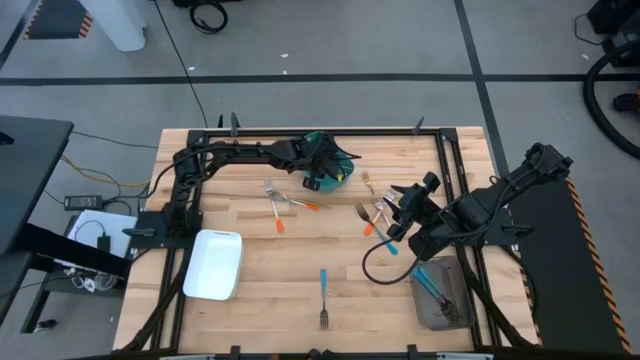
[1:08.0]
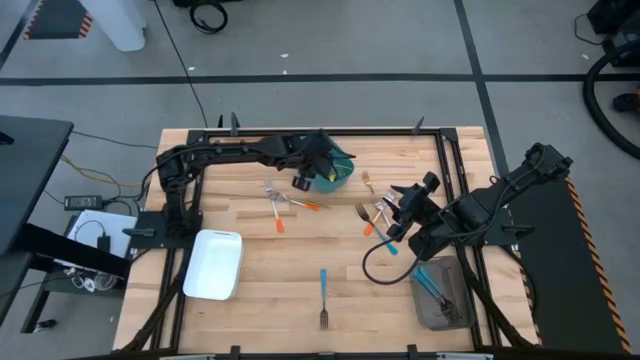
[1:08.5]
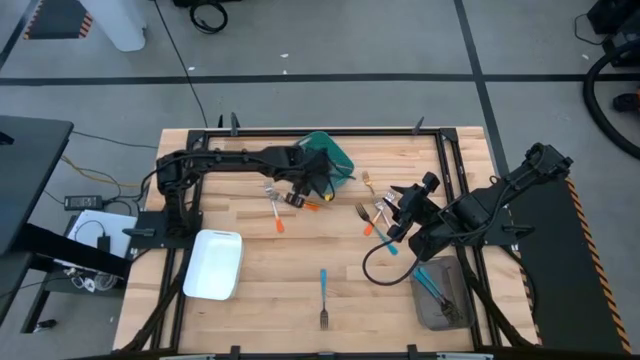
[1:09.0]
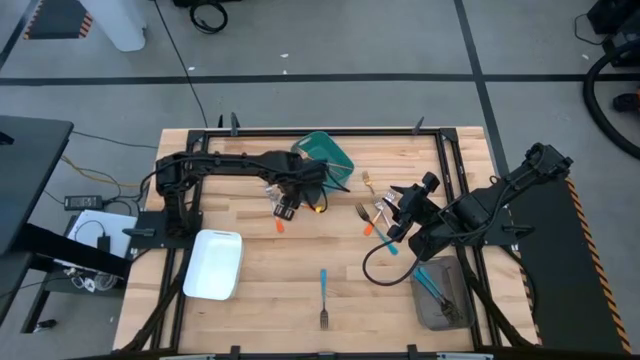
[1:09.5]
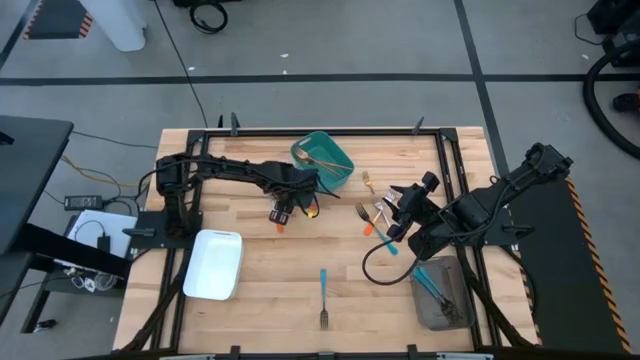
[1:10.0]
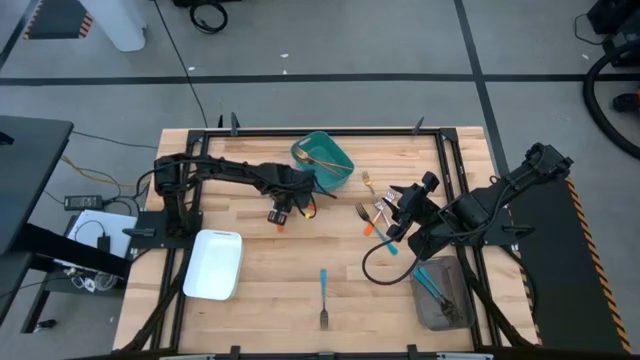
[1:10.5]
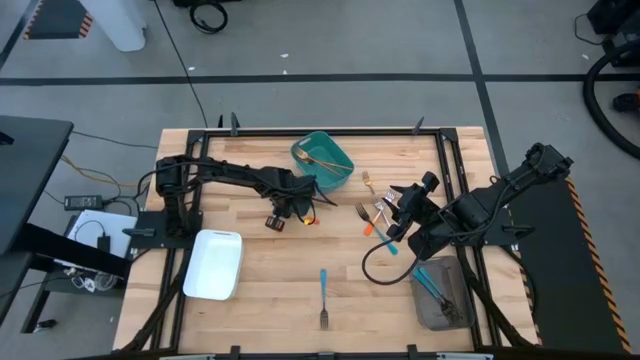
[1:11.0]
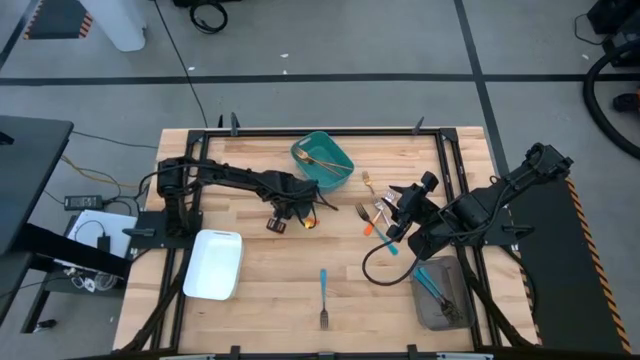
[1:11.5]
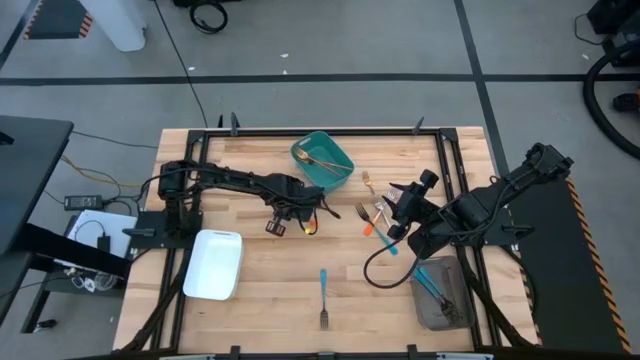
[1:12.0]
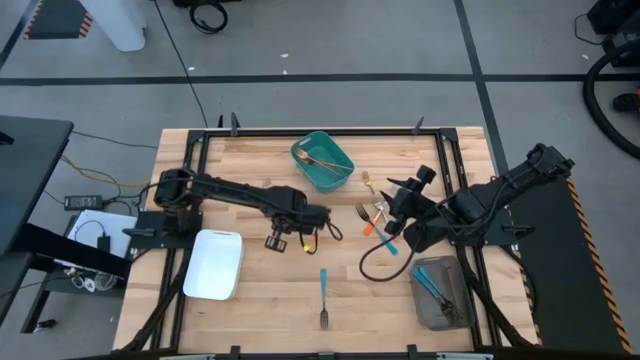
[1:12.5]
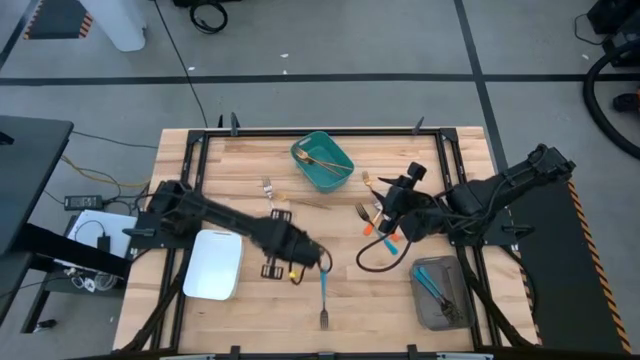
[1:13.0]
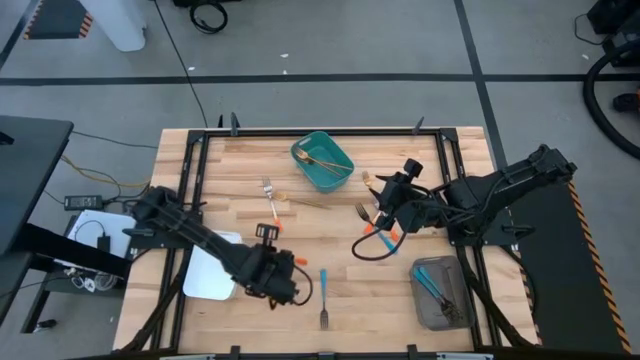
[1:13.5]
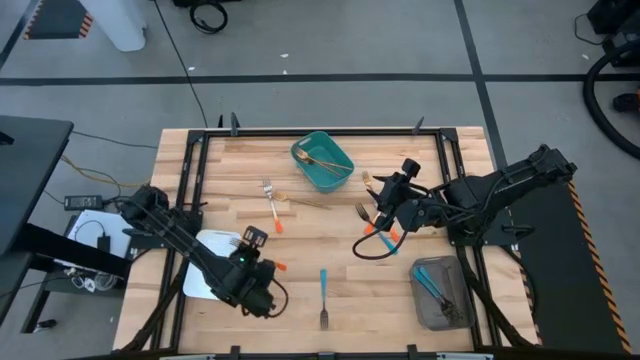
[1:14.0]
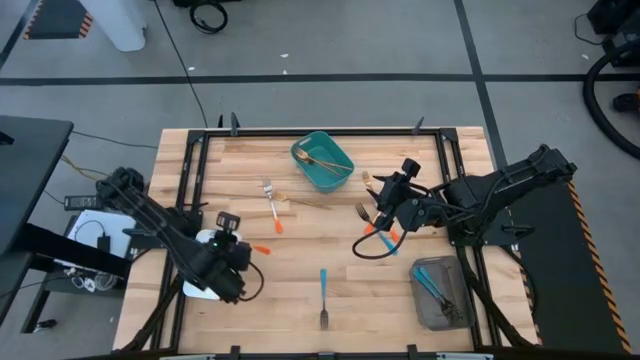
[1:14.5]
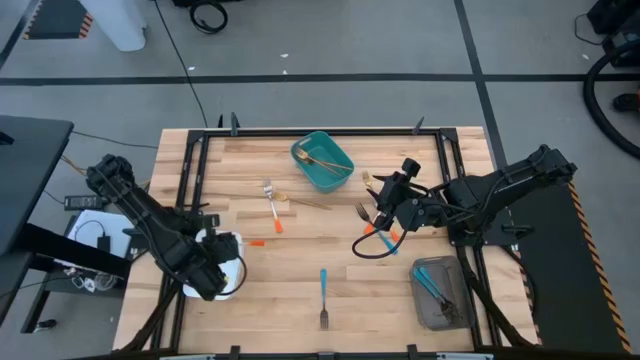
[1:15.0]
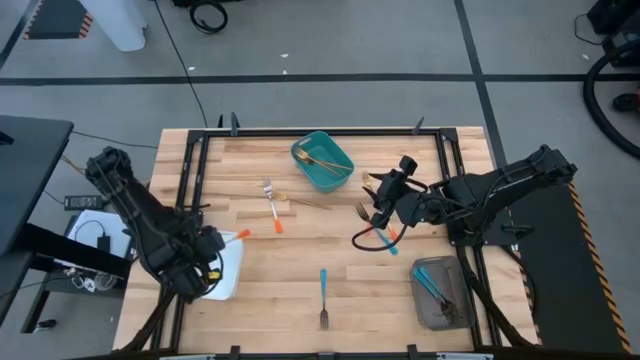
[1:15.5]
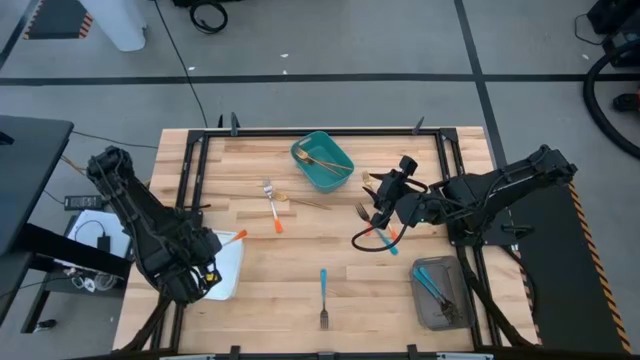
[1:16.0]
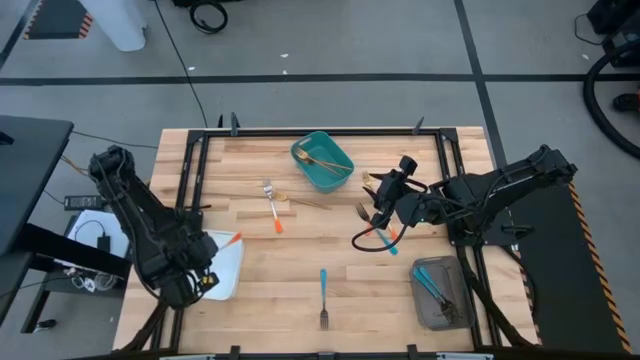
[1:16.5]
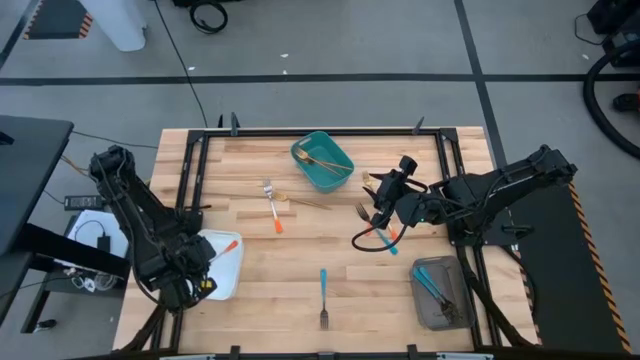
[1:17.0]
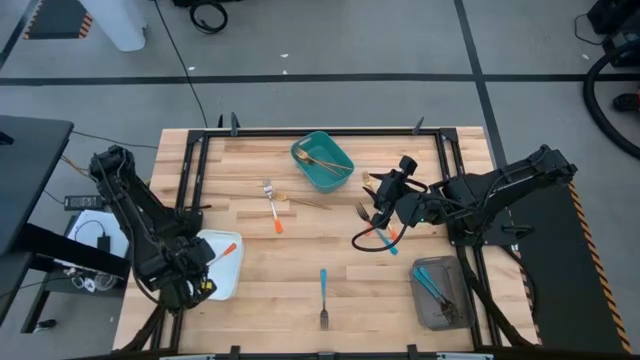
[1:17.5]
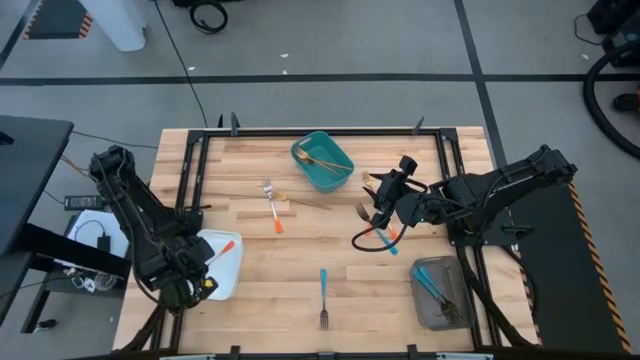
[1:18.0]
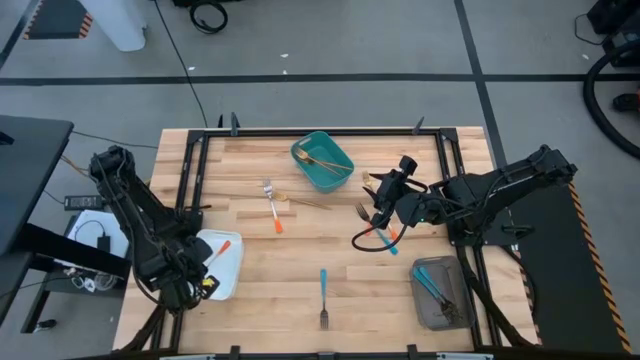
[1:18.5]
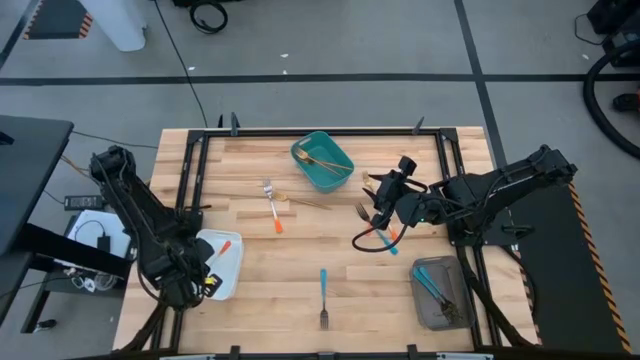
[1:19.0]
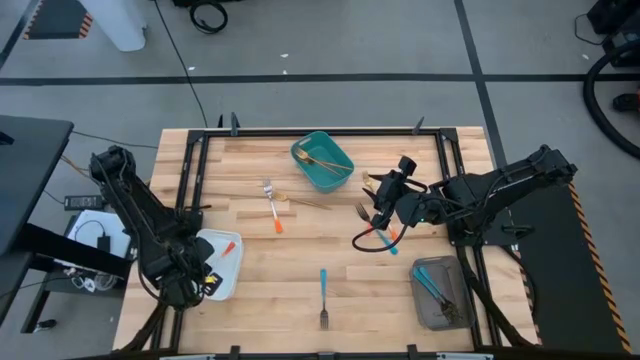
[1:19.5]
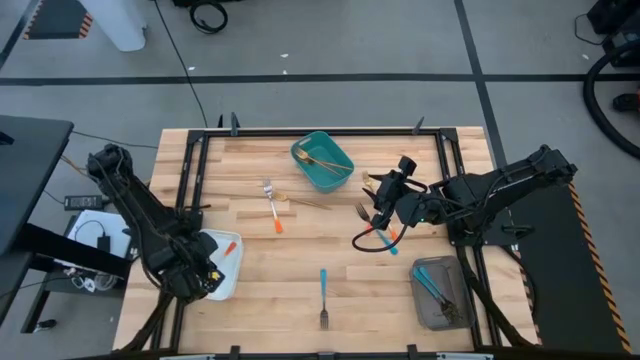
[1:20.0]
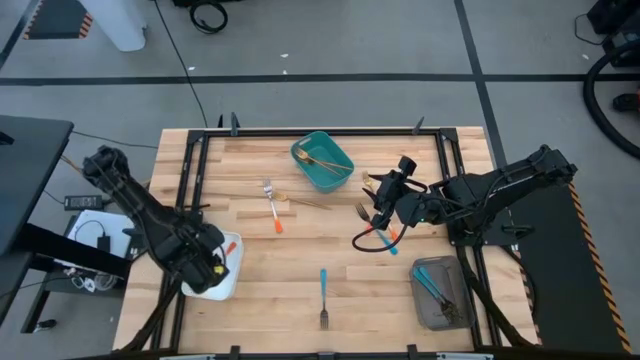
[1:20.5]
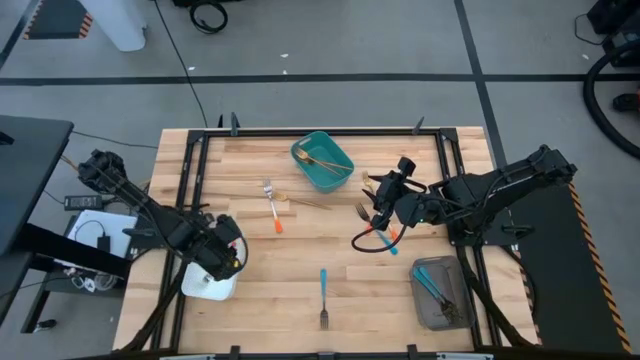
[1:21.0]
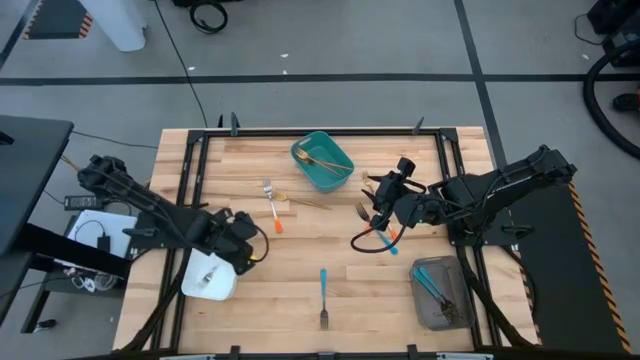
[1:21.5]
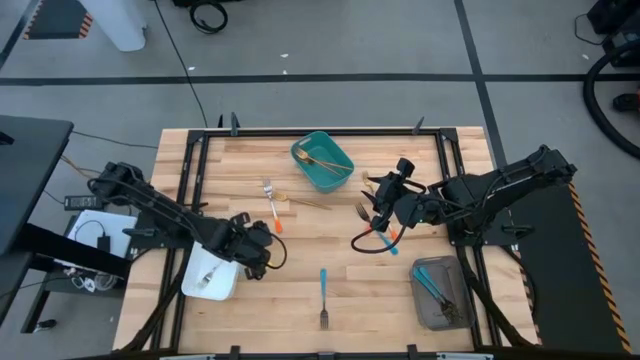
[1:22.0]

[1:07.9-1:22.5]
Task: Sort silverware by color (type)
Put the orange fork into the white bin
